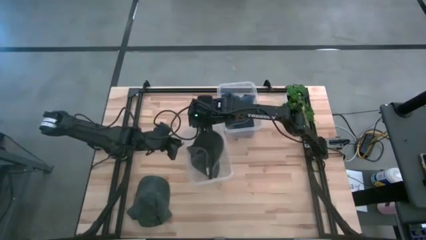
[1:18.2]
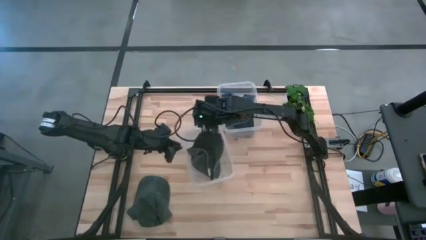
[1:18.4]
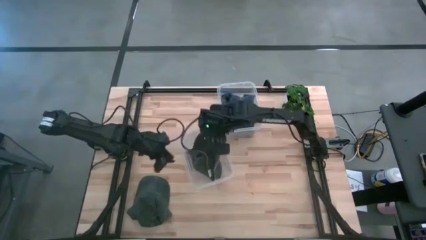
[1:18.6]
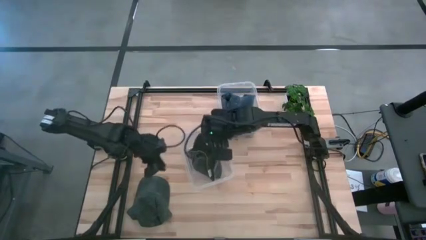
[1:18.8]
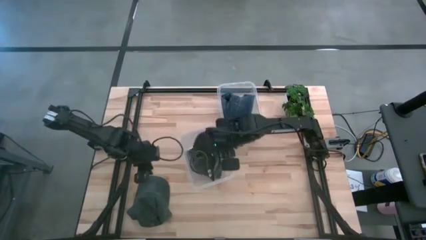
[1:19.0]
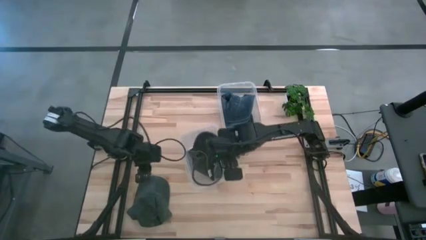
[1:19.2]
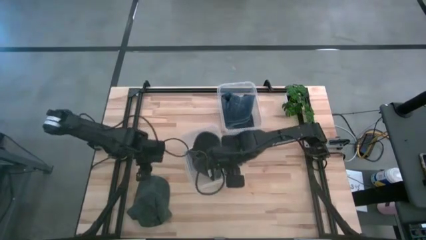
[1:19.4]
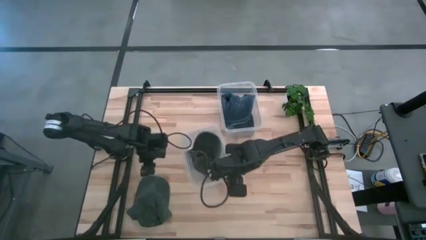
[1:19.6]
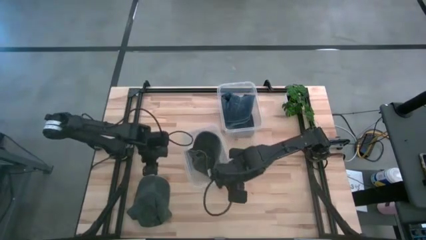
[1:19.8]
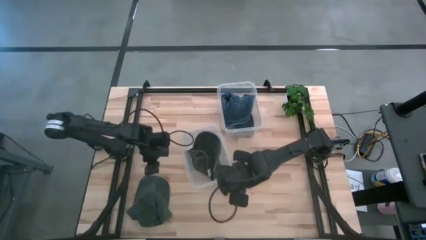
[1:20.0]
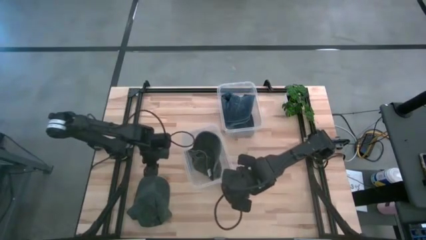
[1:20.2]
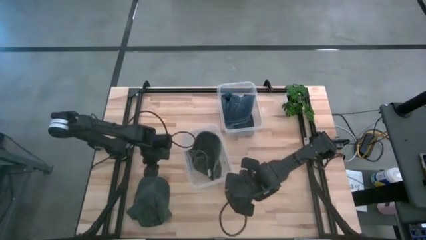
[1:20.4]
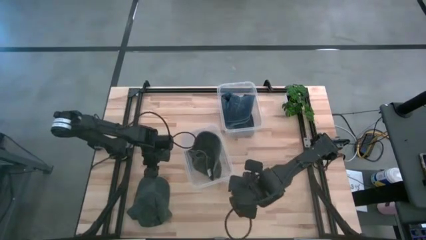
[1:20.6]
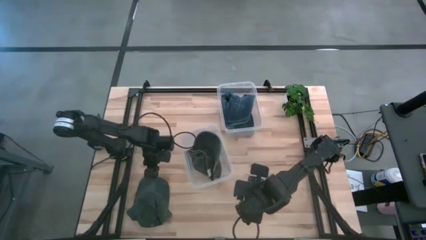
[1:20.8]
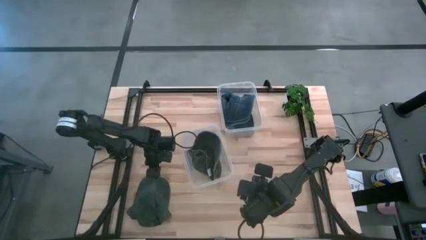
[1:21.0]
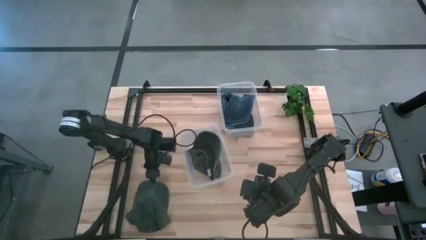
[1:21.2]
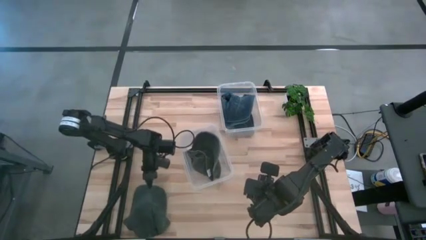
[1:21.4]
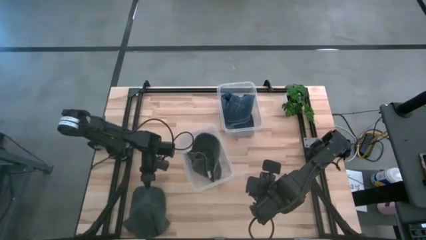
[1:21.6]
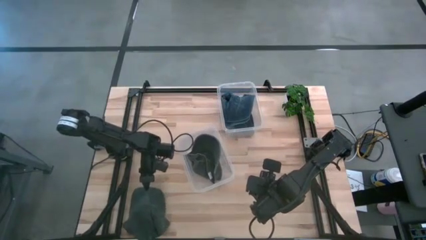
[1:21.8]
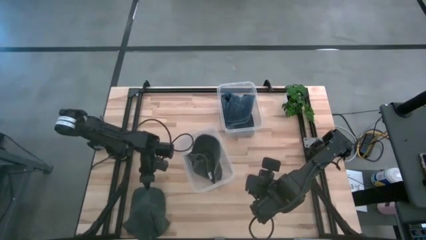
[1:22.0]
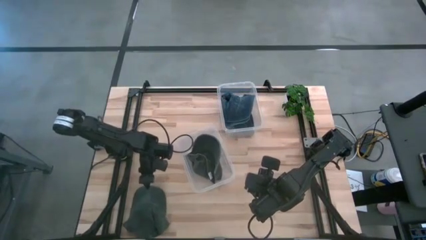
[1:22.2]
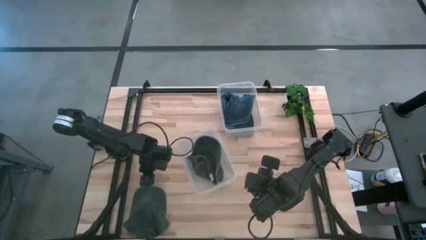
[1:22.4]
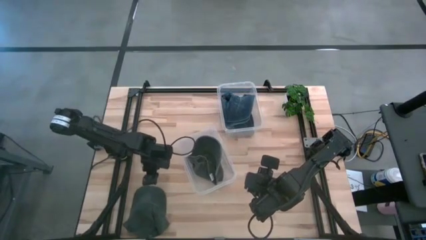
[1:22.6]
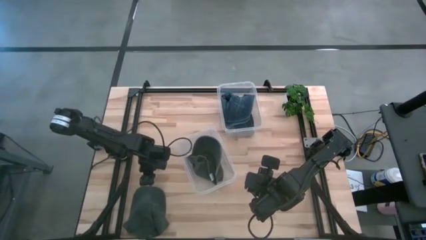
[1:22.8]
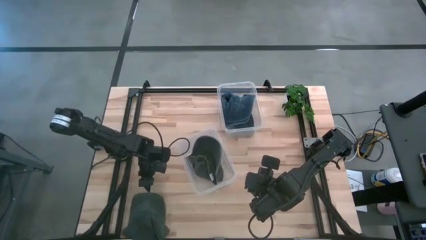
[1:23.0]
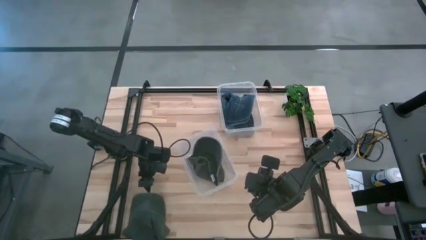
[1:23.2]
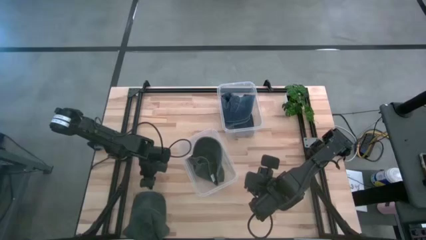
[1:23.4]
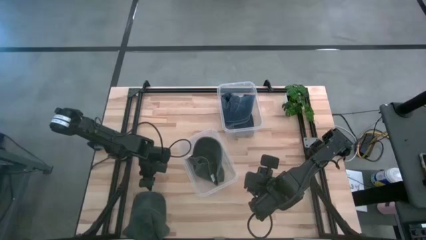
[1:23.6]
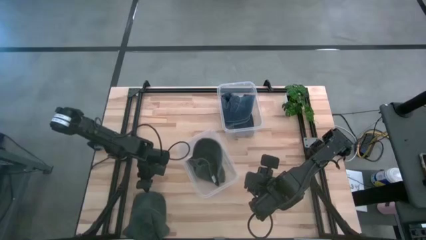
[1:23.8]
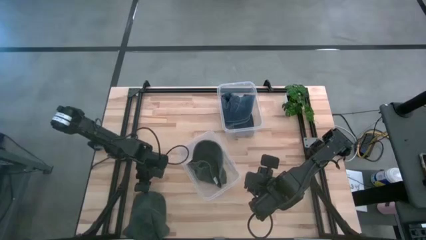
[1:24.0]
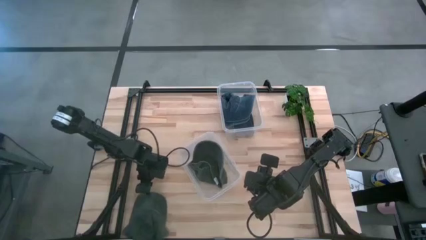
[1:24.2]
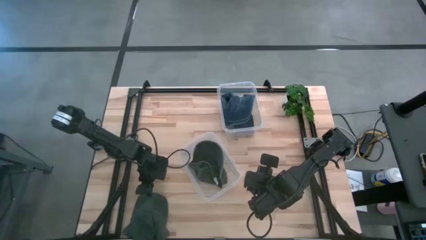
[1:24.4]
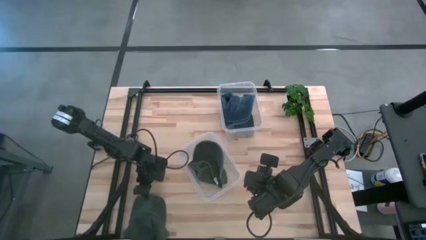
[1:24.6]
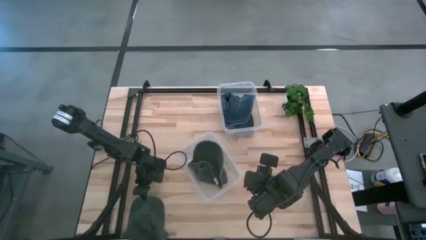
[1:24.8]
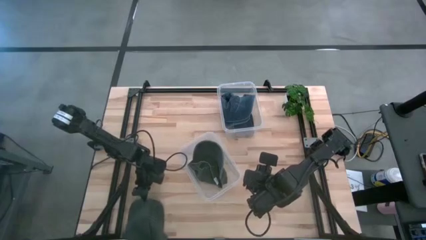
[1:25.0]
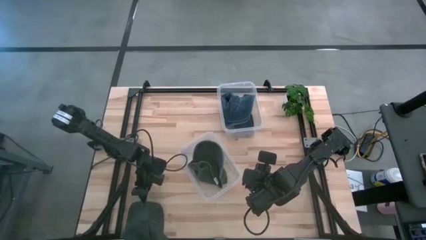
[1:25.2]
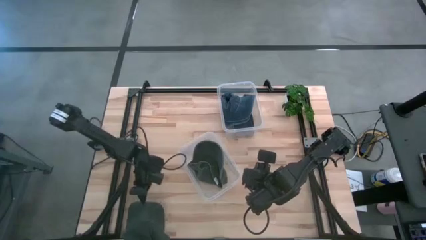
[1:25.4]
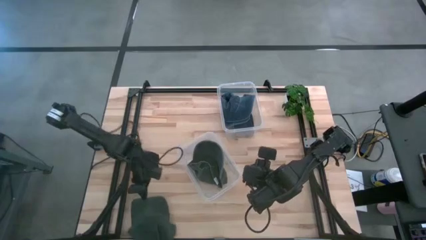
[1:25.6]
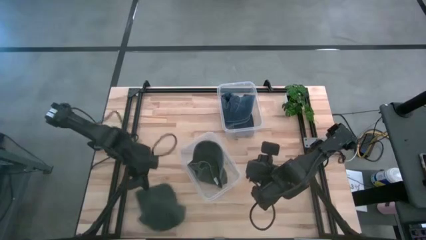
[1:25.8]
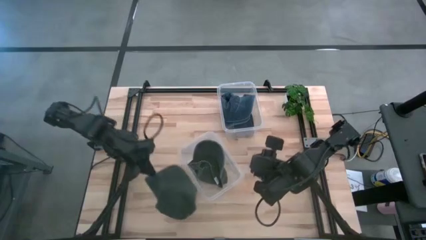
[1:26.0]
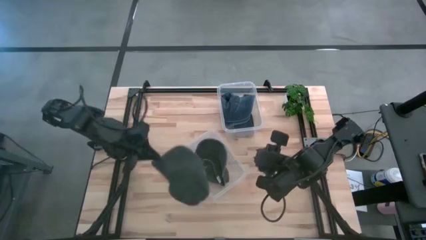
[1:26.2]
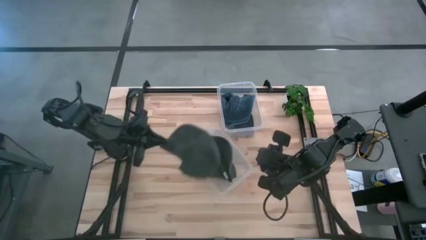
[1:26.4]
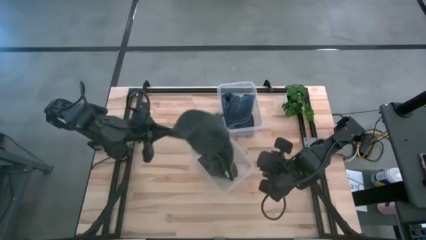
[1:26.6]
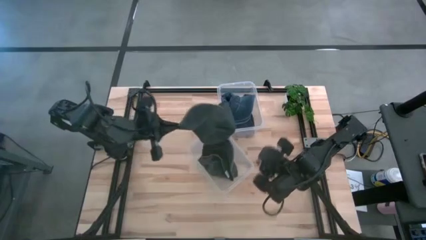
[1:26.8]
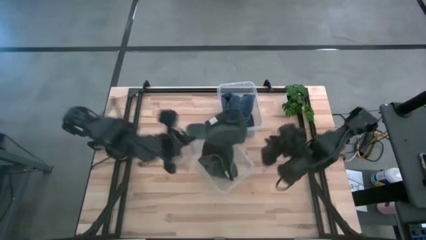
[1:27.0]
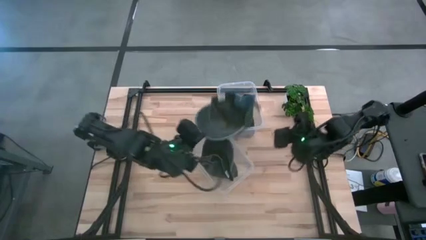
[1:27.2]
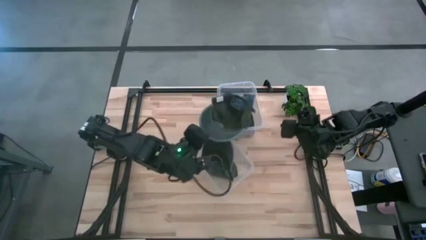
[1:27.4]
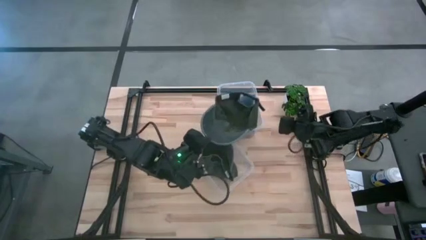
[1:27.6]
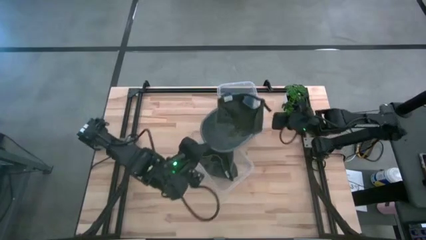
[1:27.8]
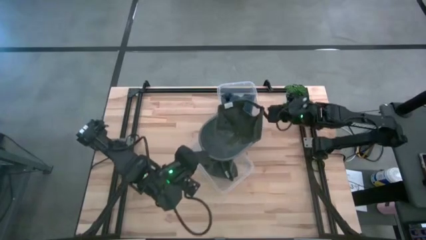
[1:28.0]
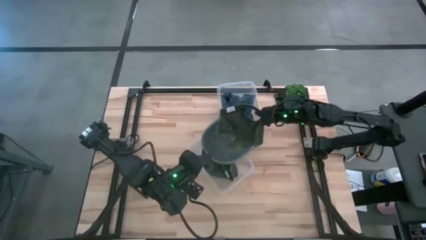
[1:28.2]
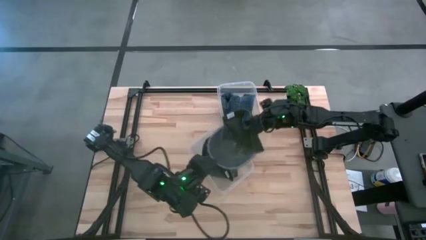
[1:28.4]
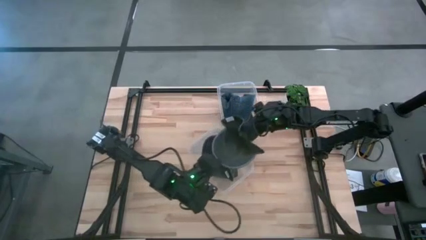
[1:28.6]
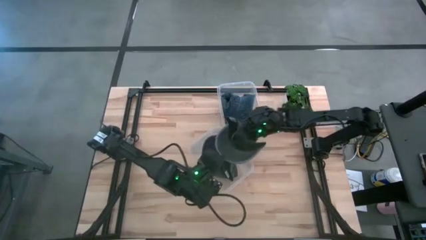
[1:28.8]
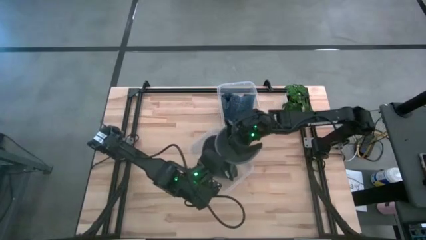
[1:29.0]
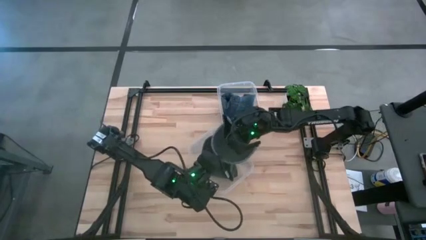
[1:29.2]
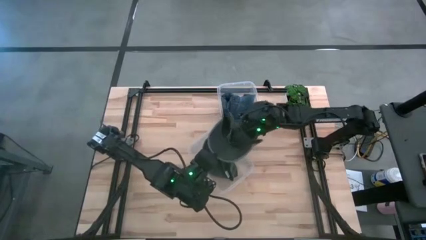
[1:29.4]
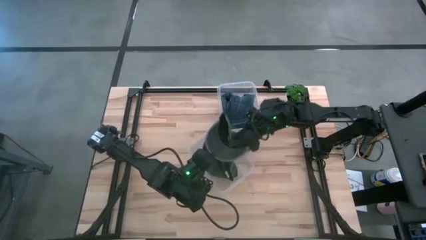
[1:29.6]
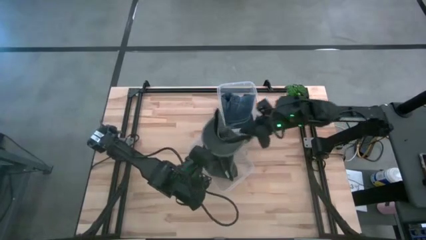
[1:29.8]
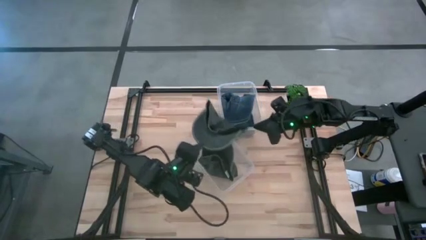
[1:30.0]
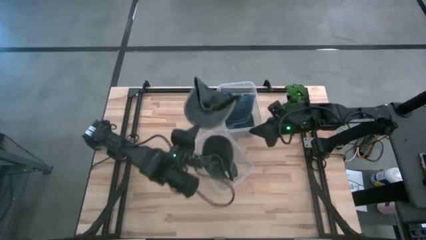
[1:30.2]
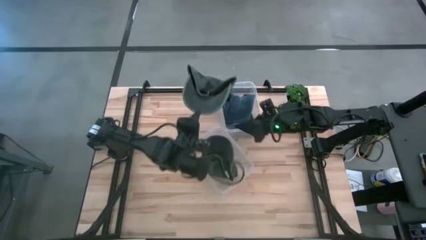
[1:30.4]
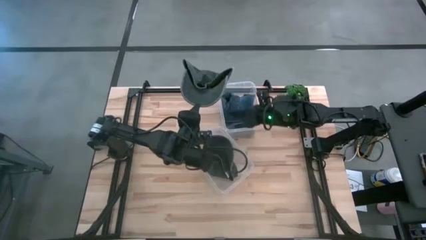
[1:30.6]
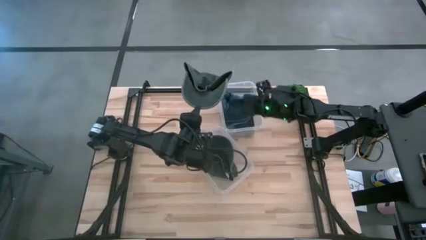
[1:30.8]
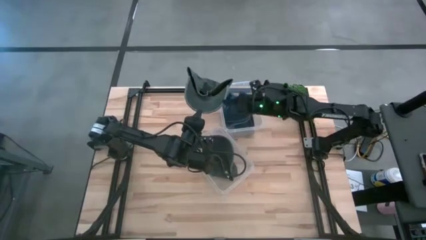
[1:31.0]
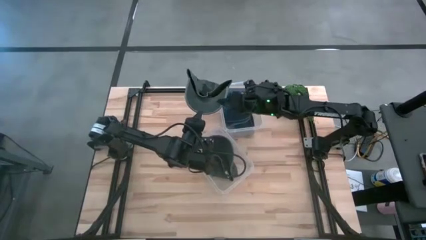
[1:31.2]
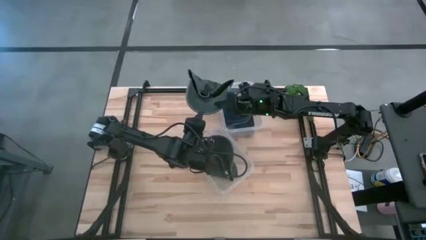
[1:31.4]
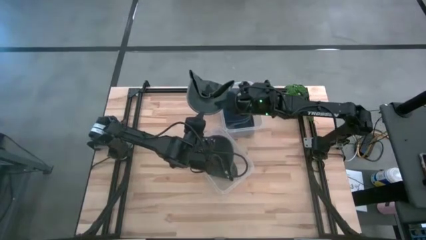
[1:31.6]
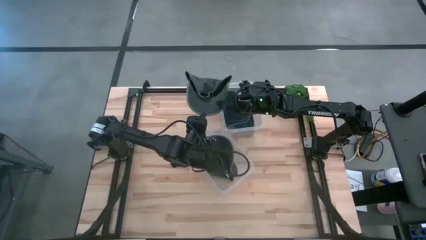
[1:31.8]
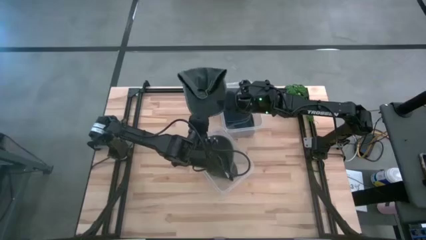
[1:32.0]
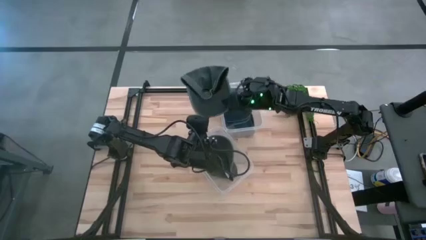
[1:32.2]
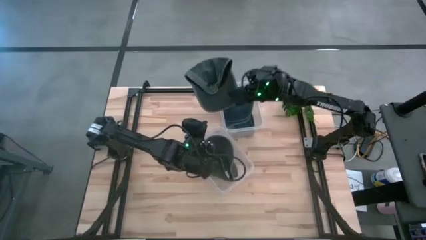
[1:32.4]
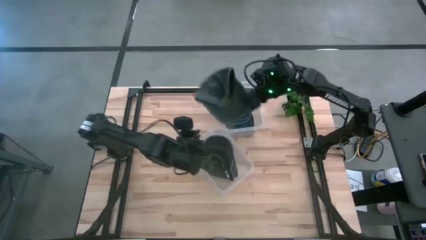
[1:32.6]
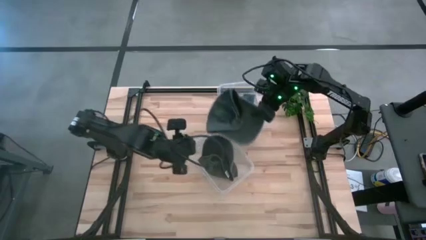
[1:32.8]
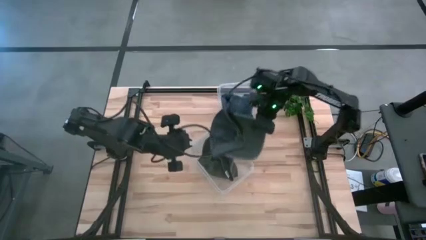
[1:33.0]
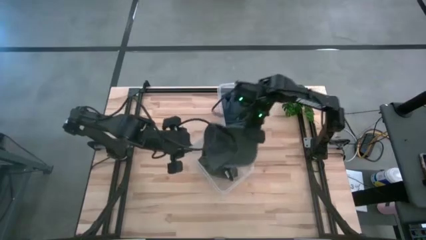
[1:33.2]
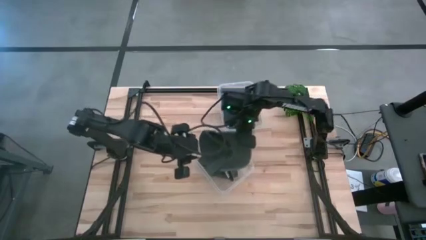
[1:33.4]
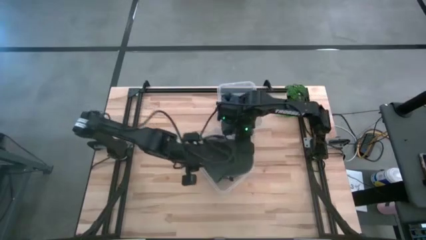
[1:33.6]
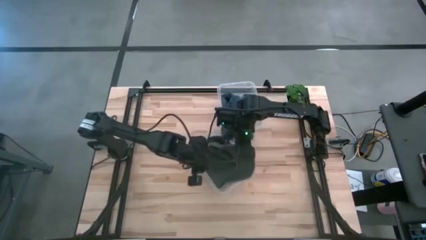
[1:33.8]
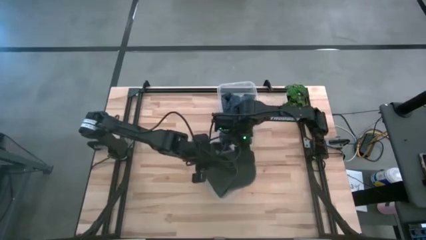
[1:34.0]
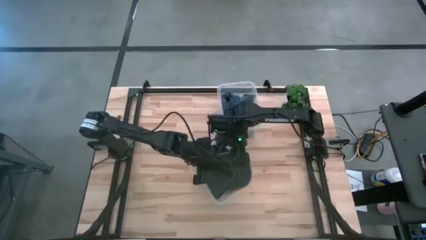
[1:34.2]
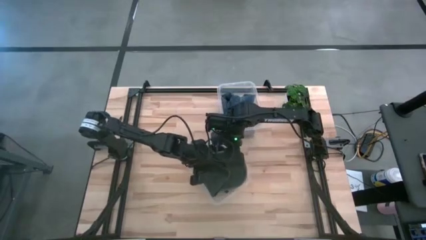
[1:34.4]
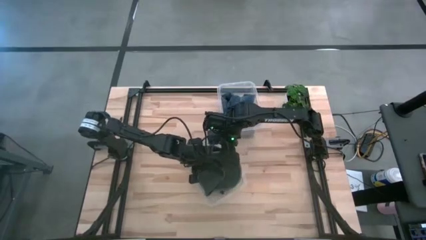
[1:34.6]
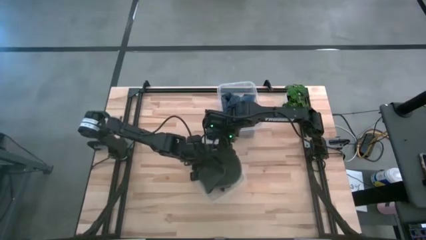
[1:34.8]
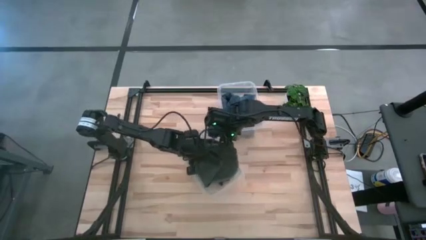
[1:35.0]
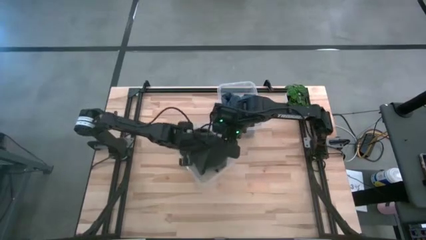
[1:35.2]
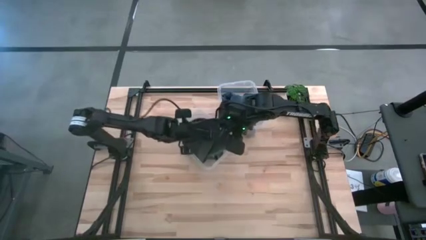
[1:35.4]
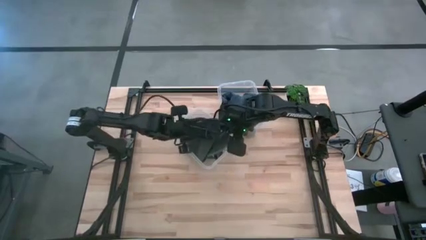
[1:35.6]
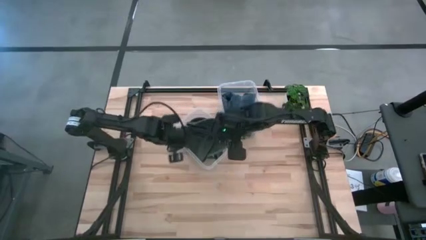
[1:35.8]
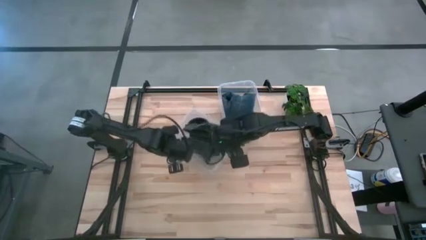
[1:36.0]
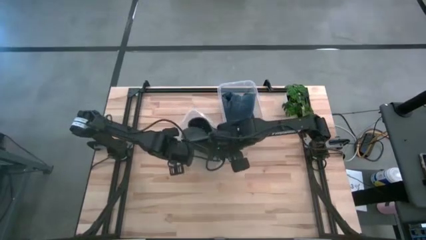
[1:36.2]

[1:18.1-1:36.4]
Task: Pick & Place hat
Put the black cap into the left transparent bin
